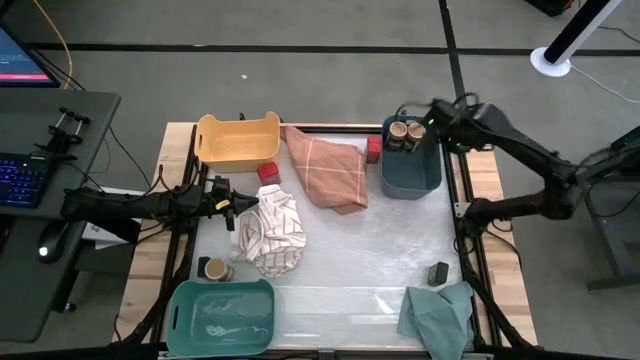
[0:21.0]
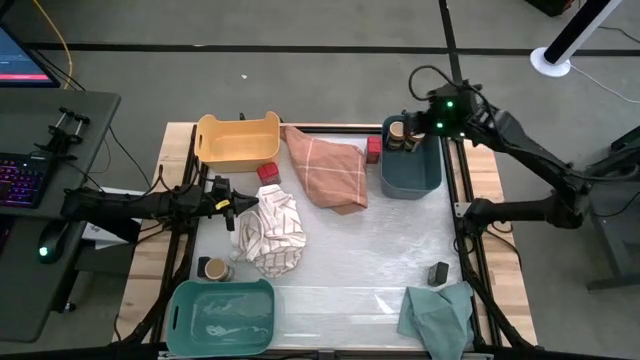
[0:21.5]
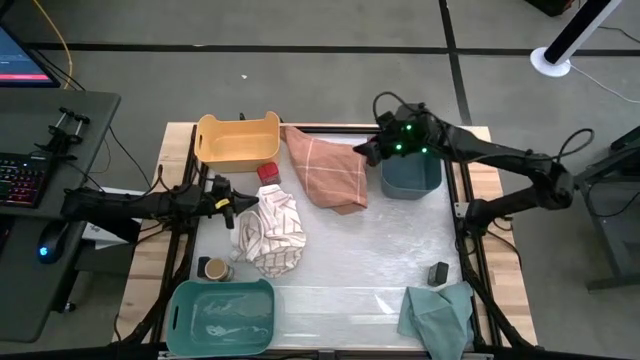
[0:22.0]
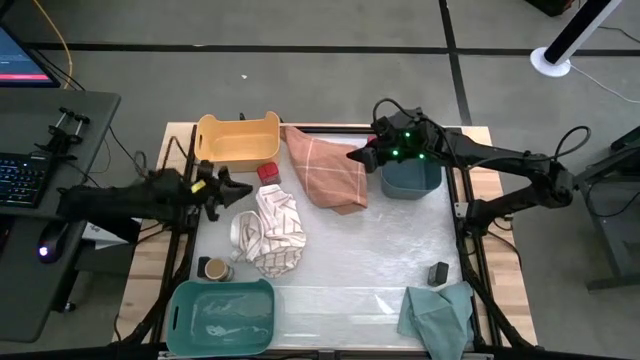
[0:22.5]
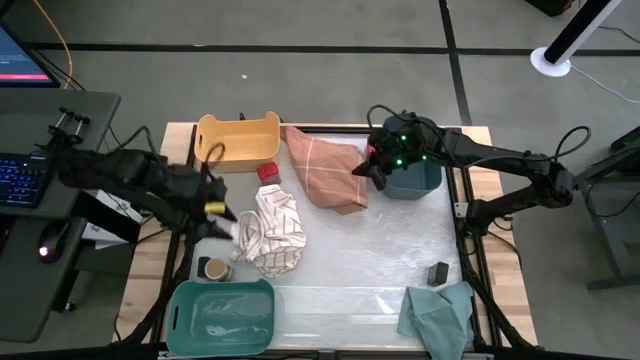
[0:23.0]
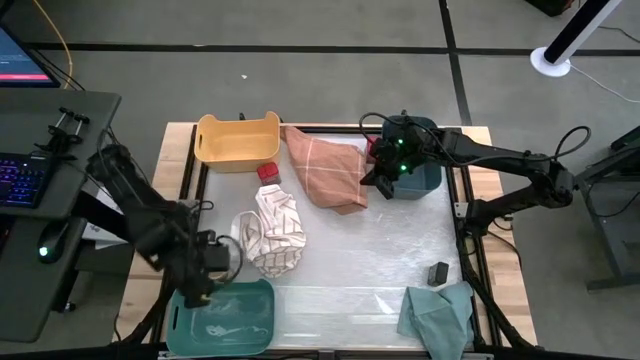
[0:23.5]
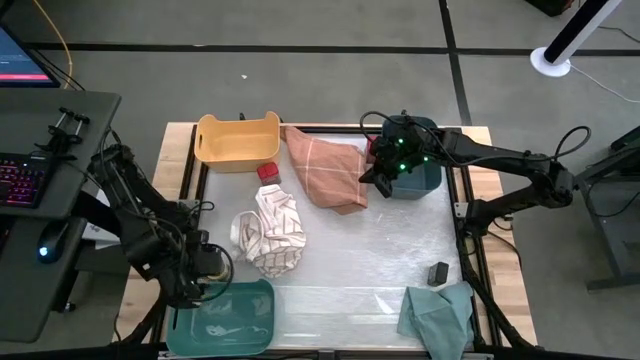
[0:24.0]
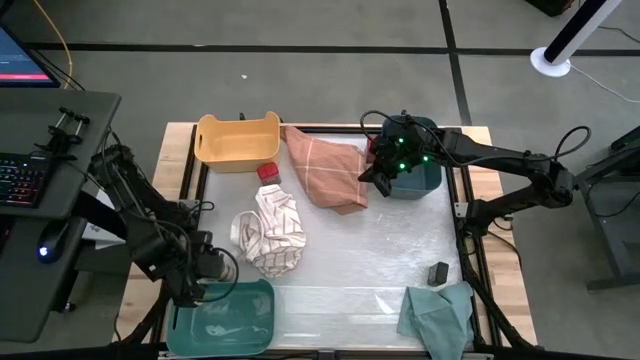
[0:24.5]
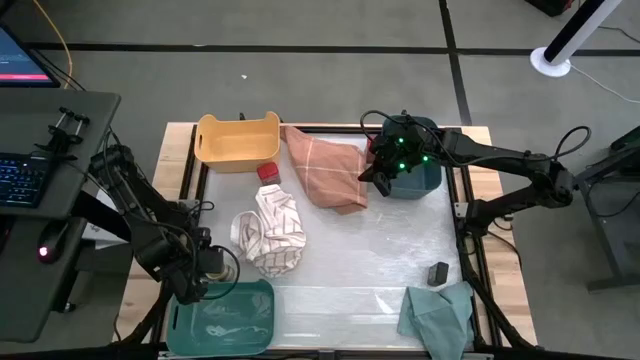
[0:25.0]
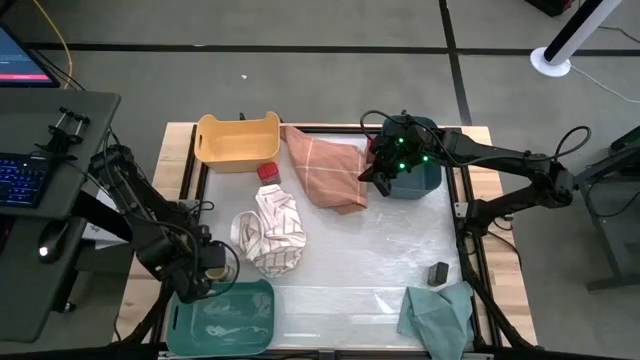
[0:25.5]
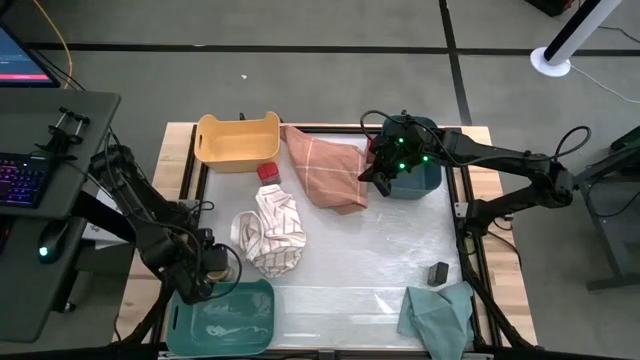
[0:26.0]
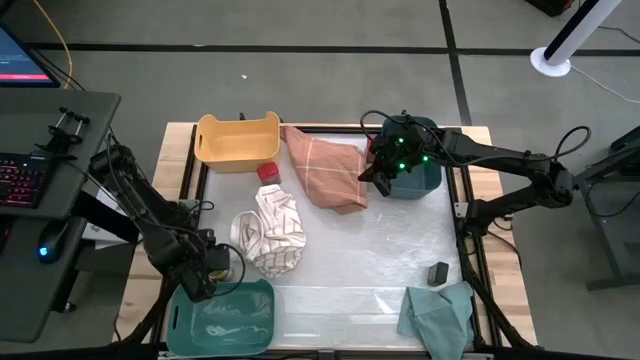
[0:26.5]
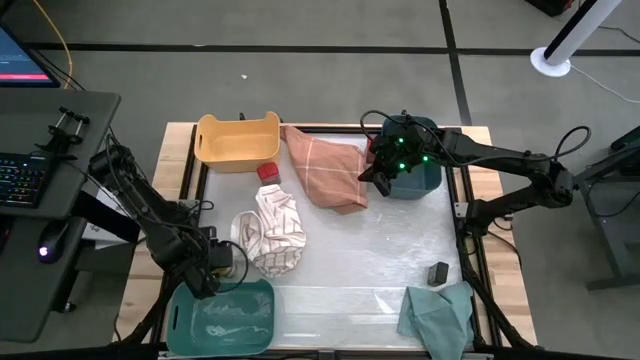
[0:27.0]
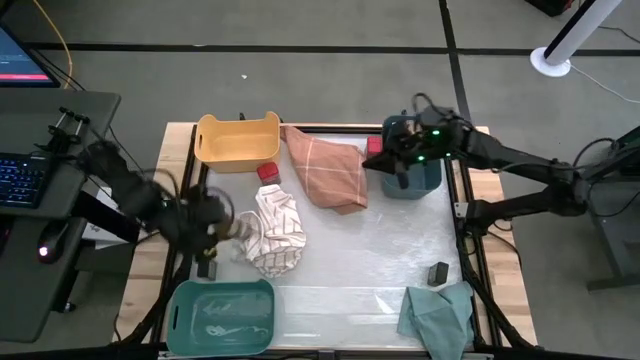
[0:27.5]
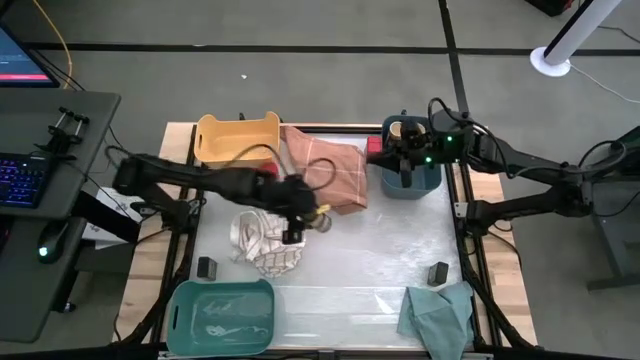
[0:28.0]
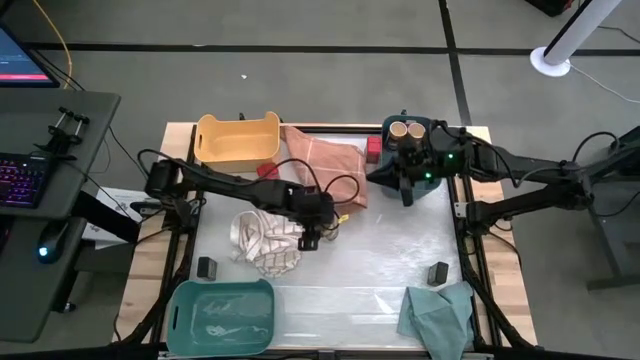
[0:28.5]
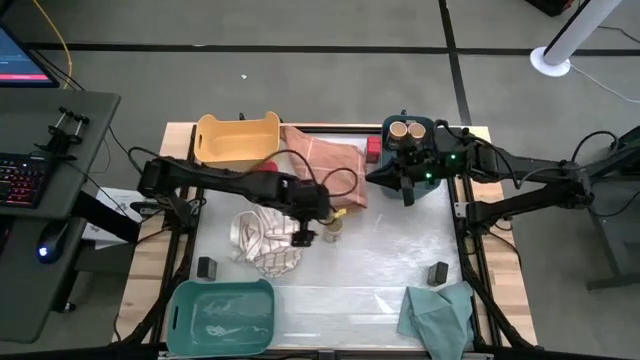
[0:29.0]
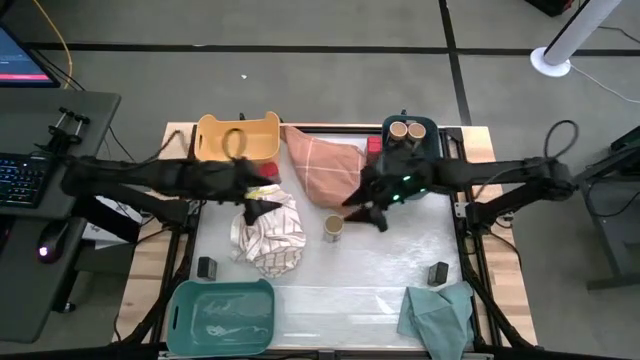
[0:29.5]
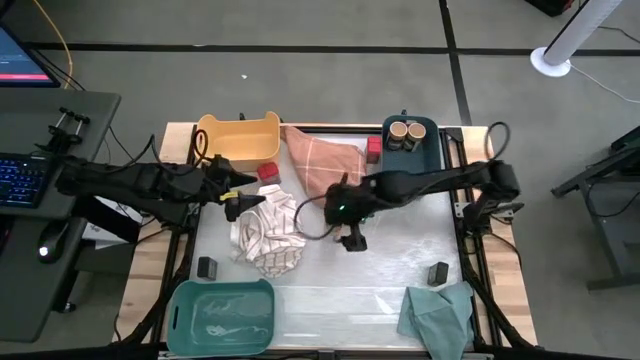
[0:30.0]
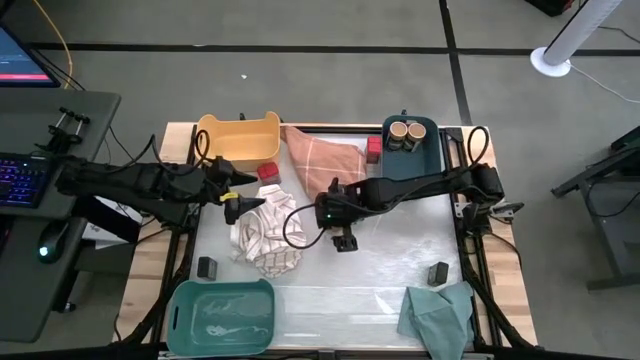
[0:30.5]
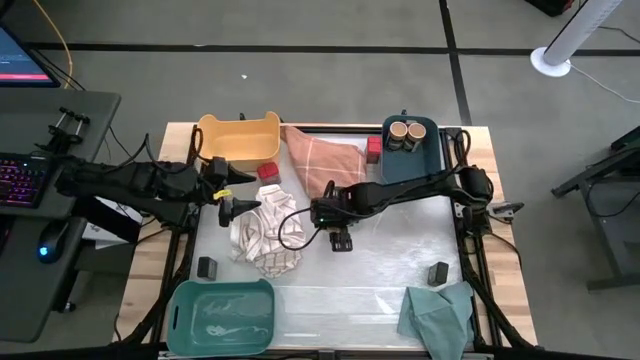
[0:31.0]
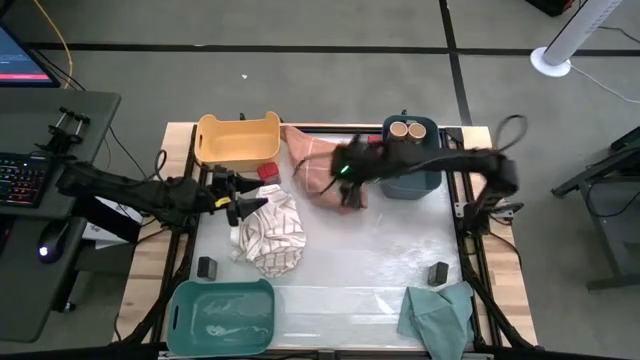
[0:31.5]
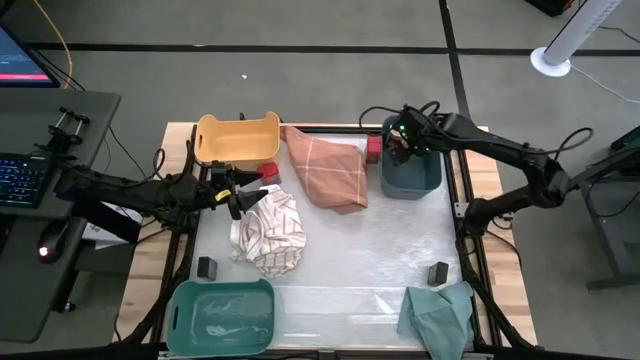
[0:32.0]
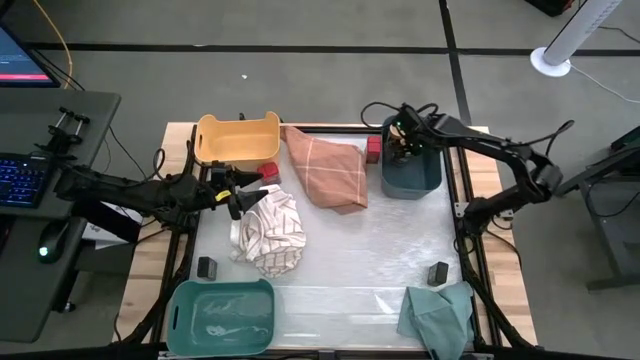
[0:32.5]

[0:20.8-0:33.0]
Task: Sort spices by type
Put the gold seasoning bottle into the blue bin

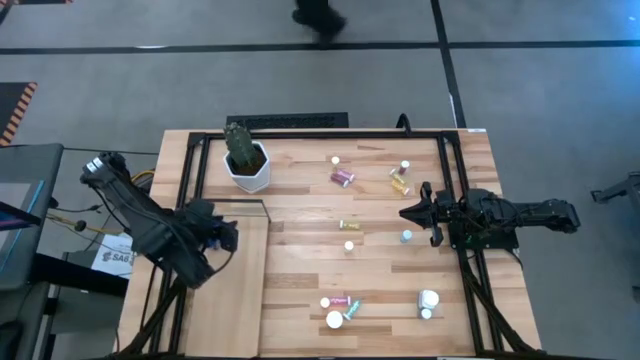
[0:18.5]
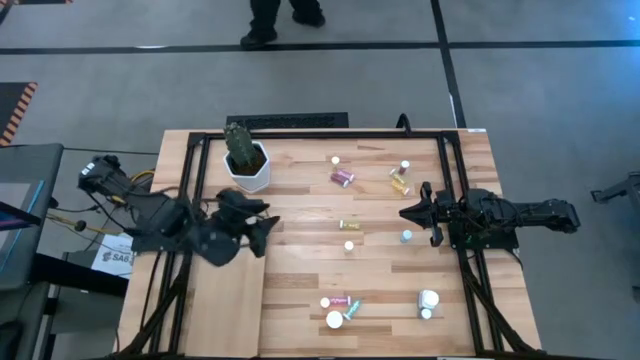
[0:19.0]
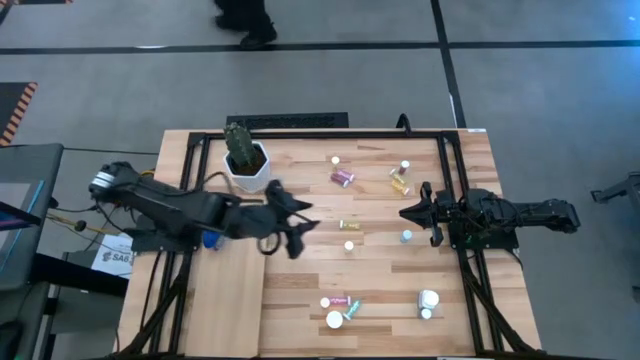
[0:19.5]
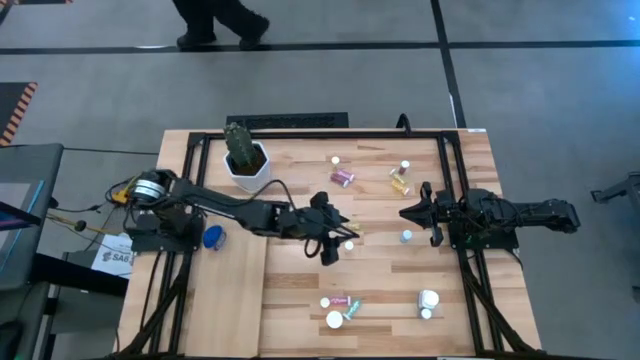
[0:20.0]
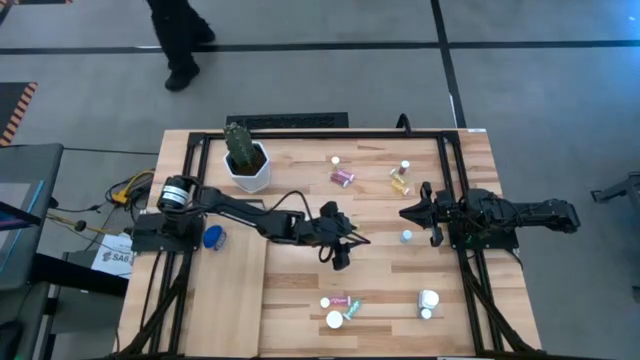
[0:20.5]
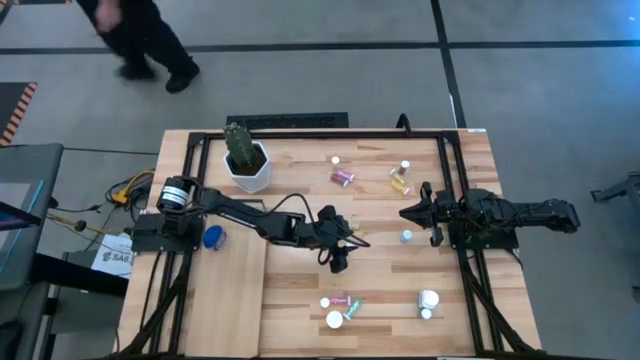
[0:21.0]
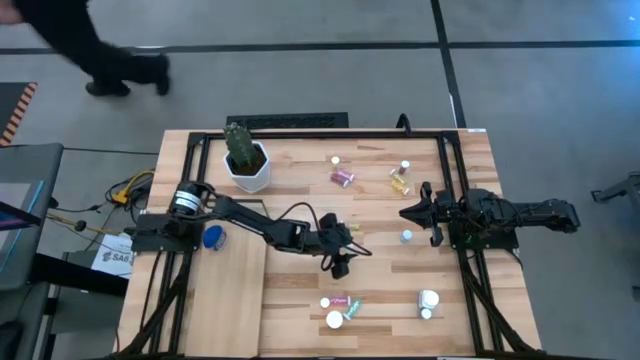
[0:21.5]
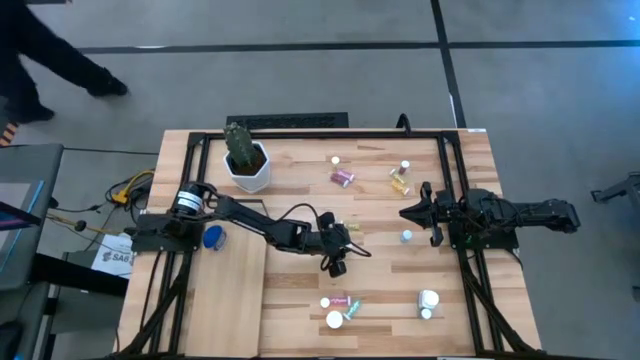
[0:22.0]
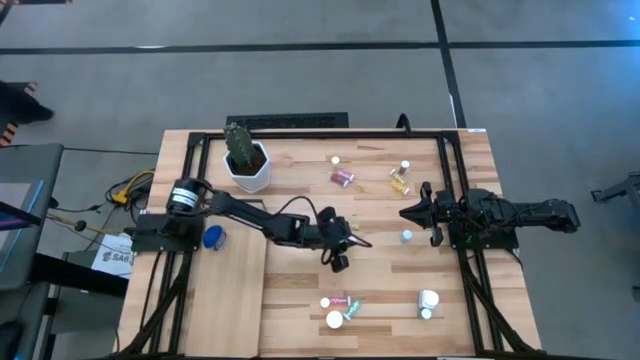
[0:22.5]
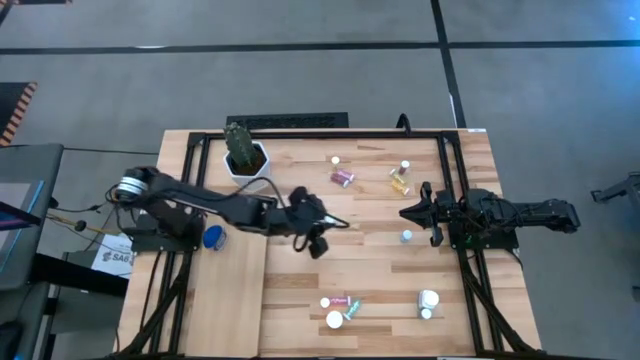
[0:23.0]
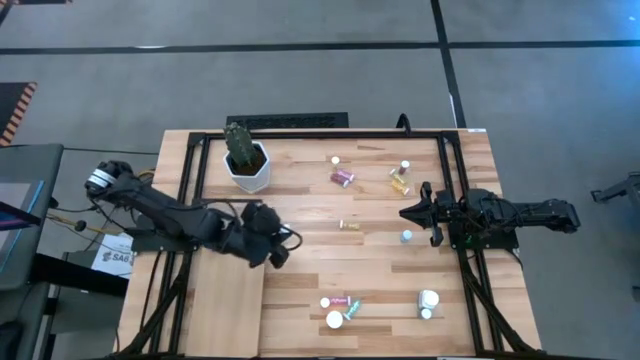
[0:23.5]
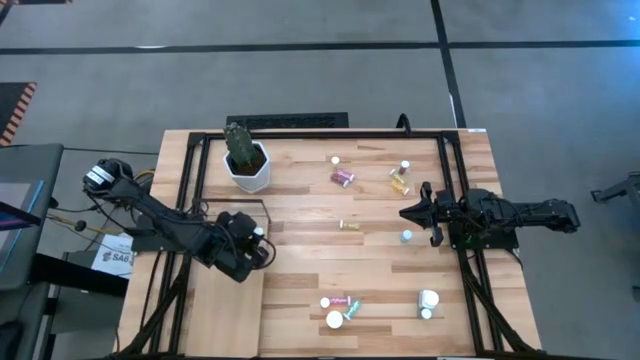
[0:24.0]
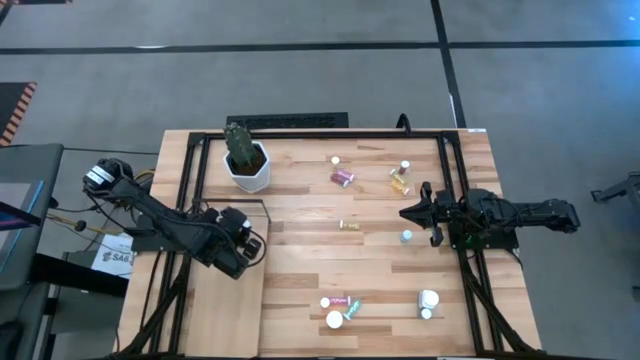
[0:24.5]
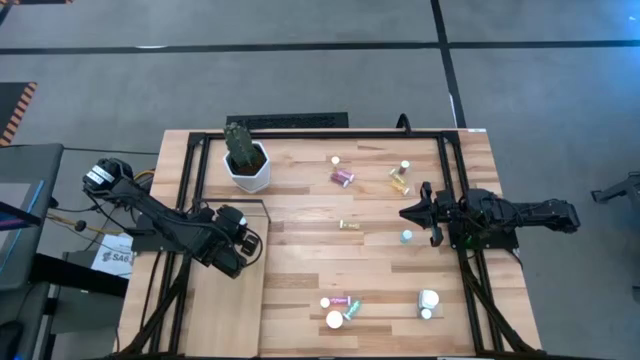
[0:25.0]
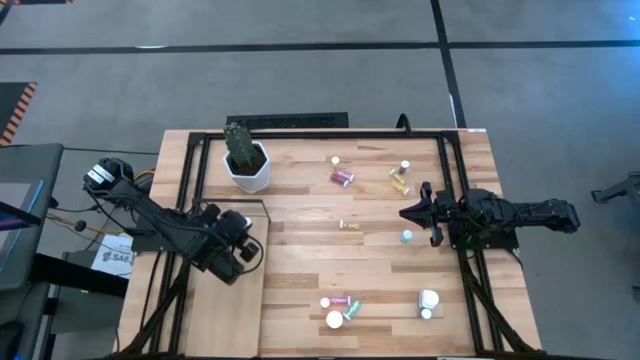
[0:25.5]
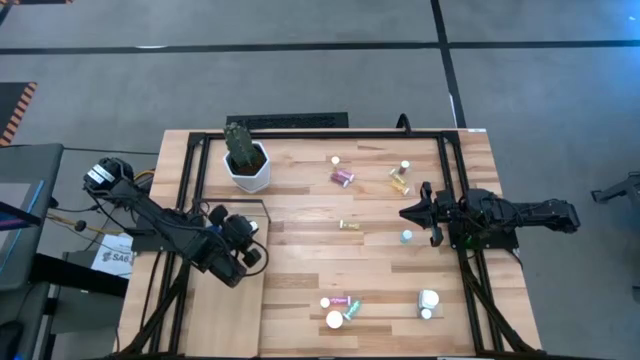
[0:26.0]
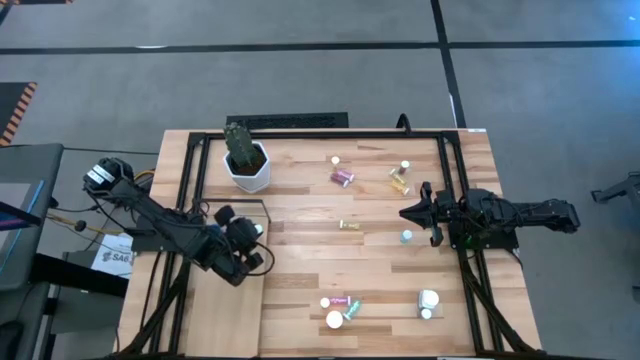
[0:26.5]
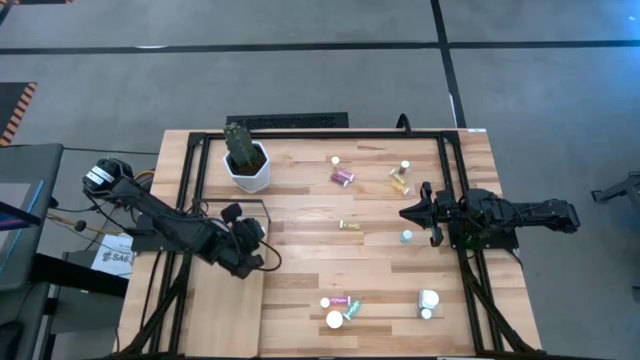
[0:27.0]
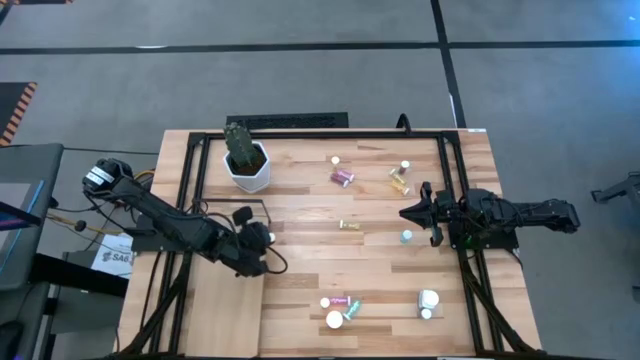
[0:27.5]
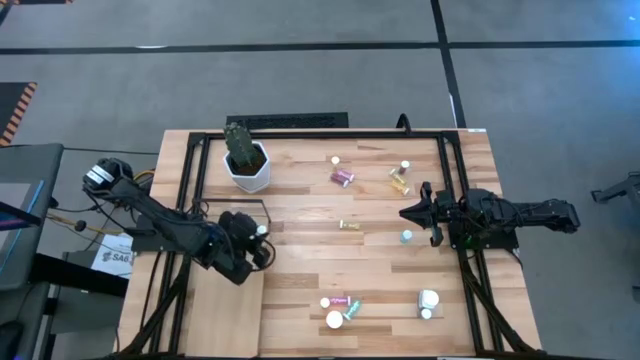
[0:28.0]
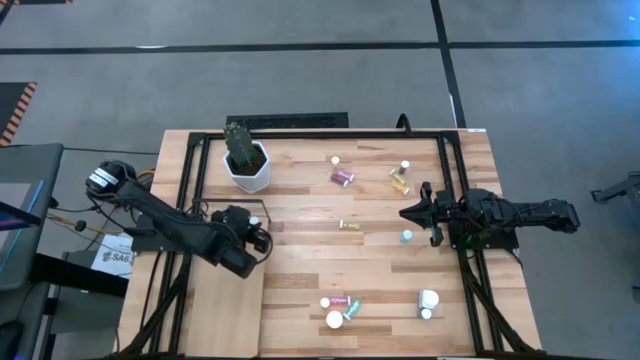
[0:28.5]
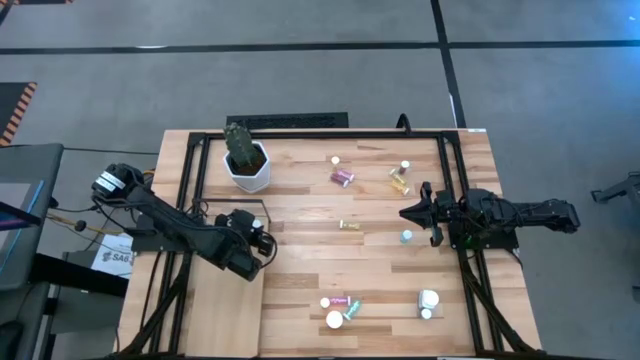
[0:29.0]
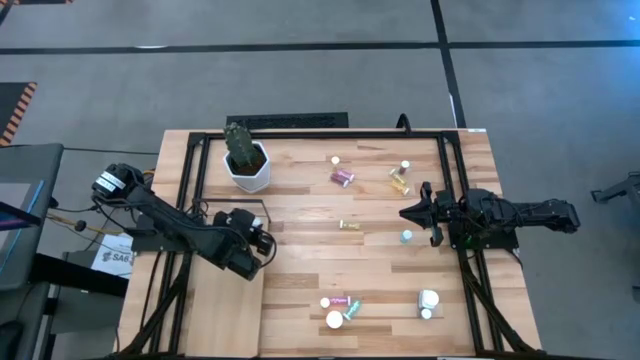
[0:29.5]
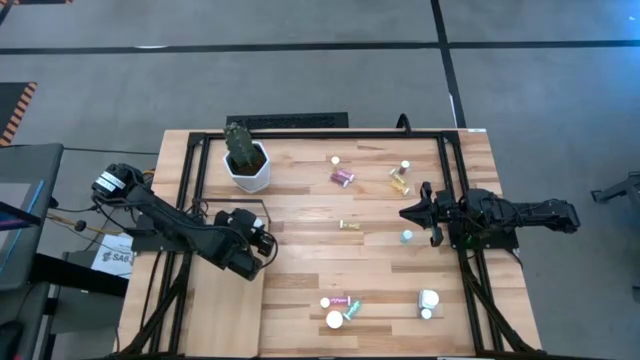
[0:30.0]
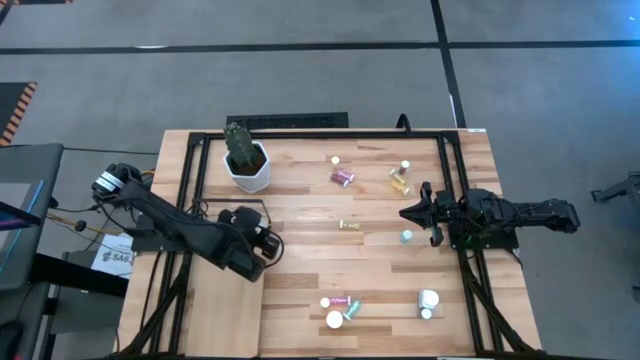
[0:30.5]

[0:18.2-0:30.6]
Task: Pick and place medicine bottles onto shelf by color
Put the yellow pill bottle on the shelf
